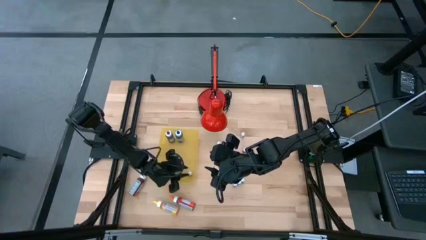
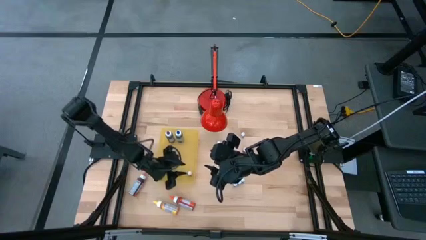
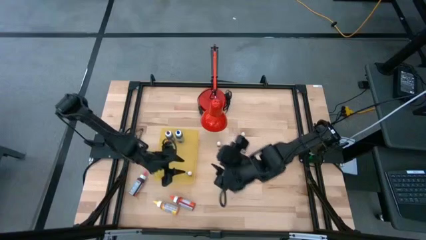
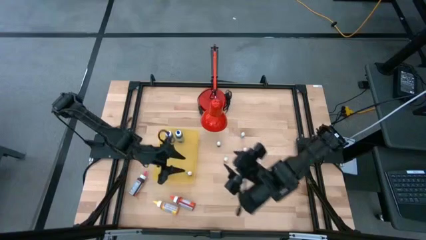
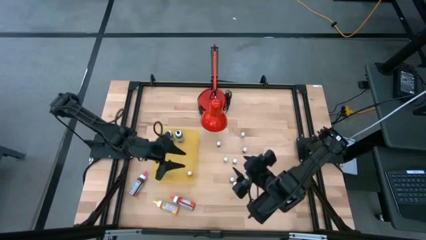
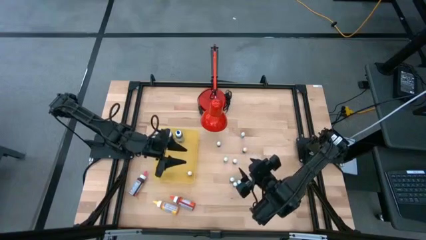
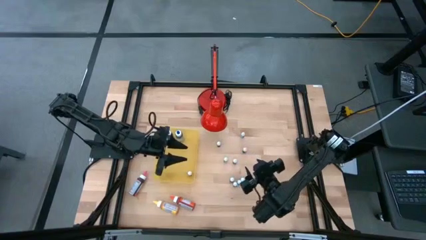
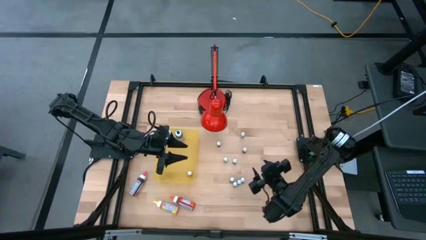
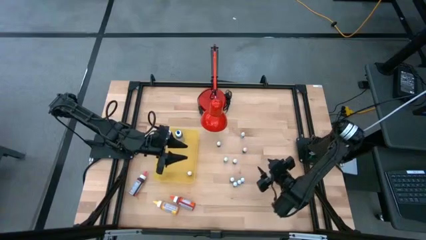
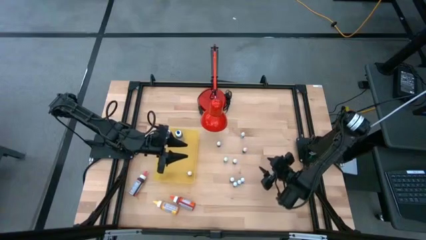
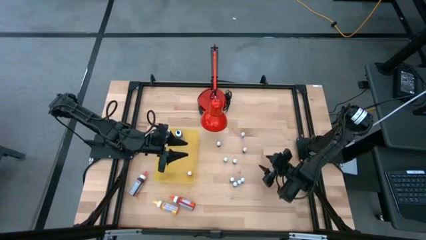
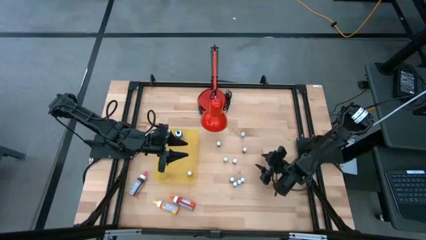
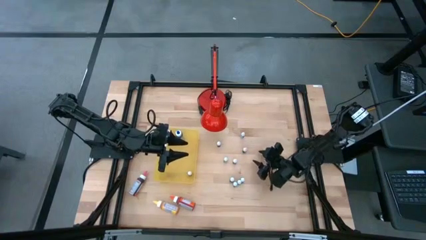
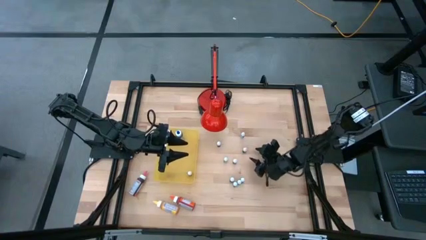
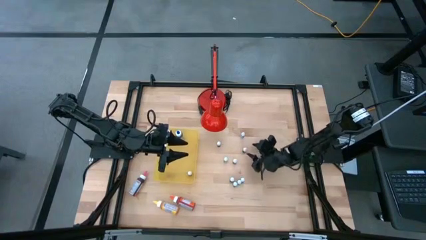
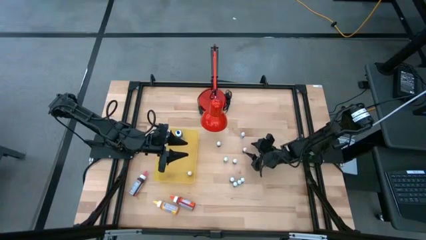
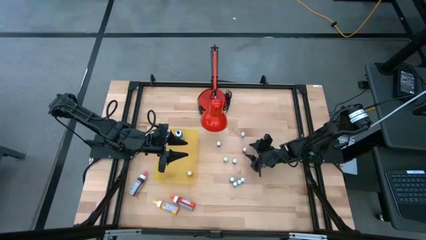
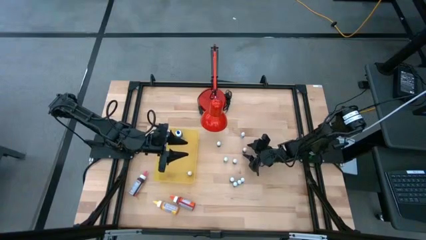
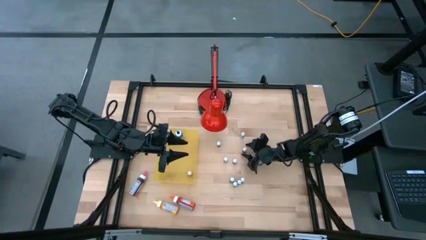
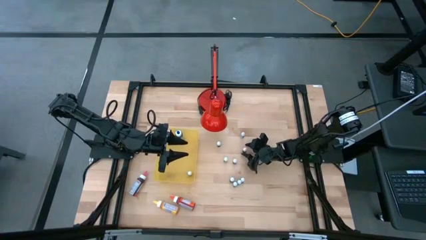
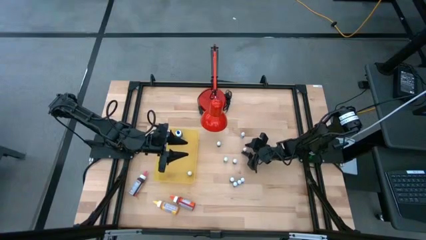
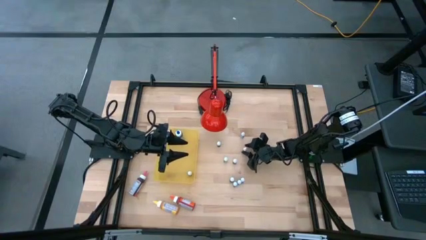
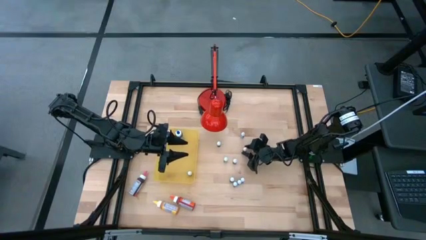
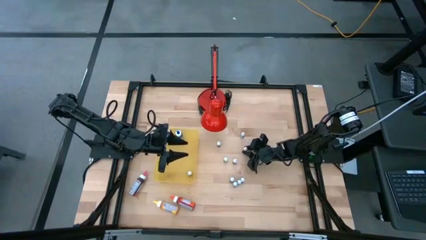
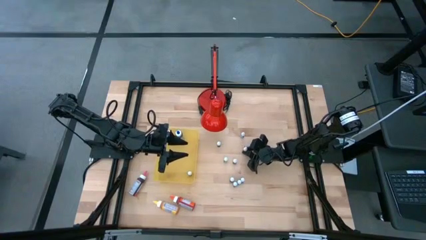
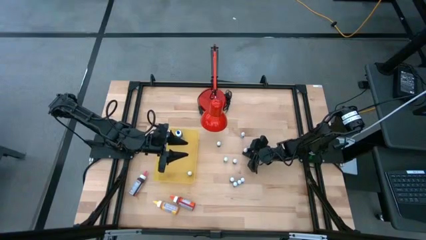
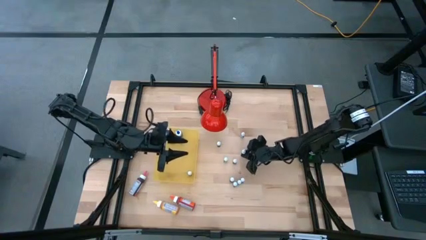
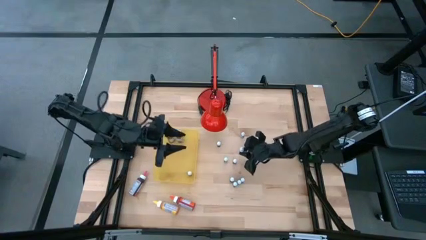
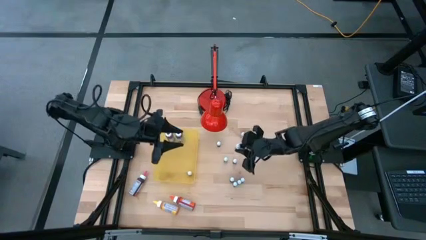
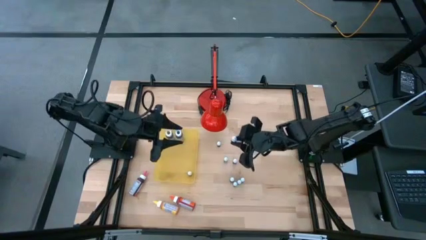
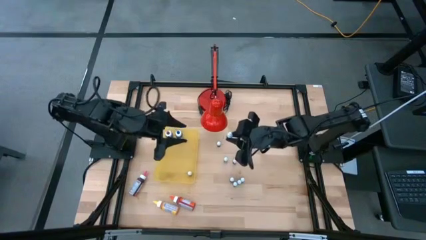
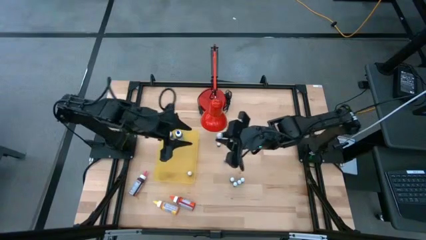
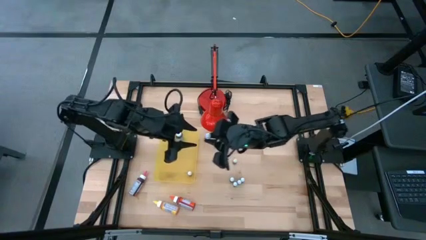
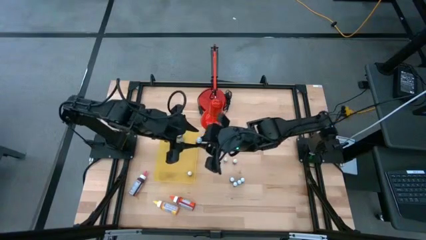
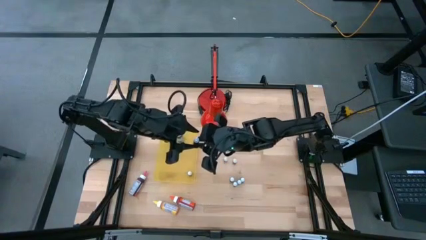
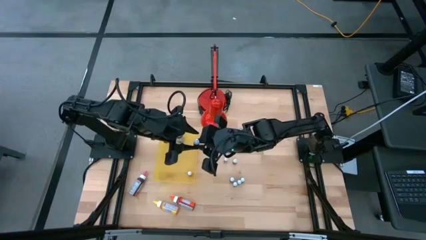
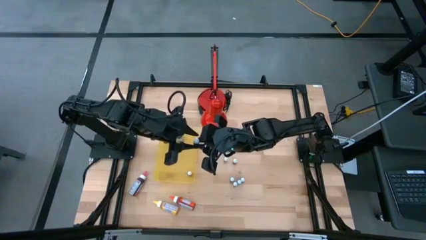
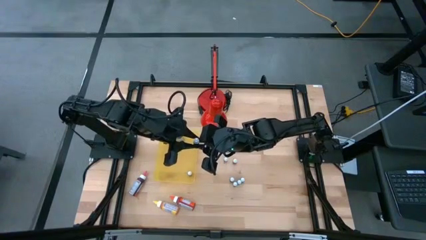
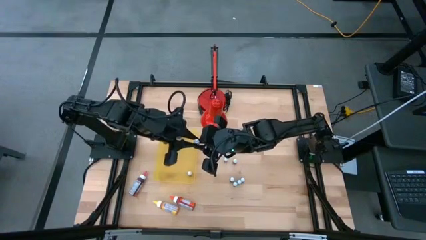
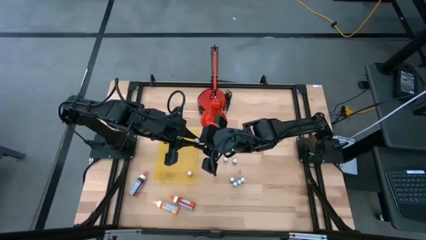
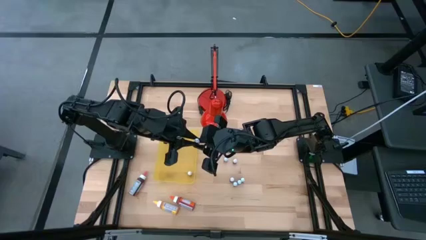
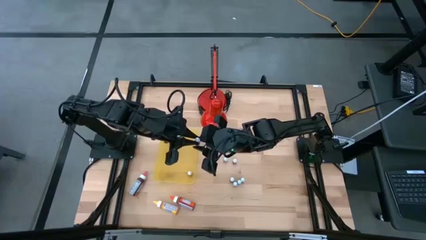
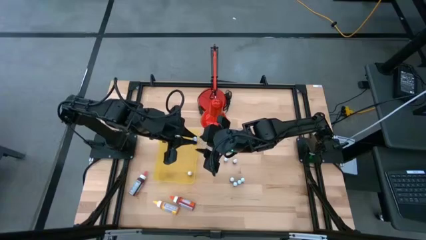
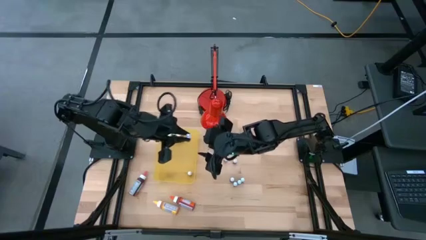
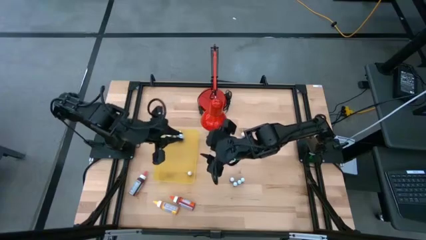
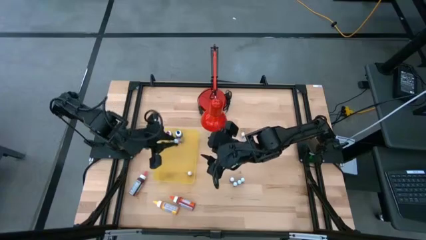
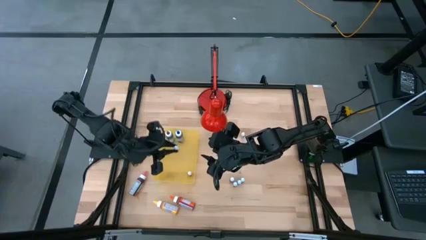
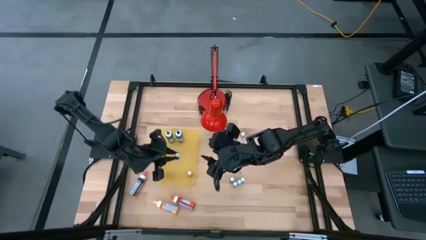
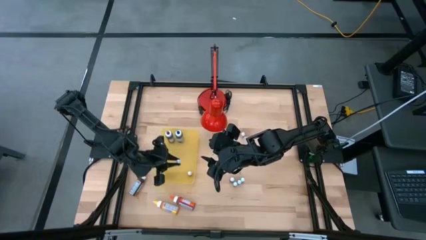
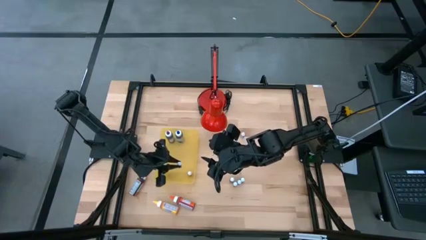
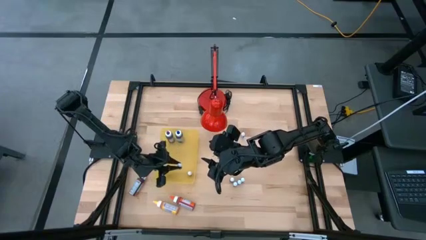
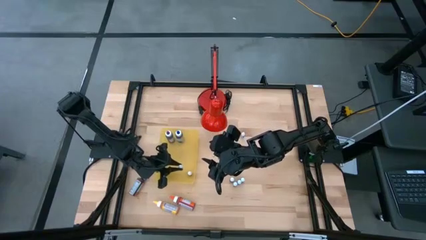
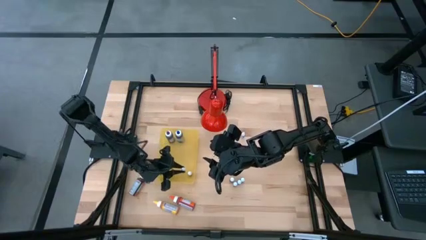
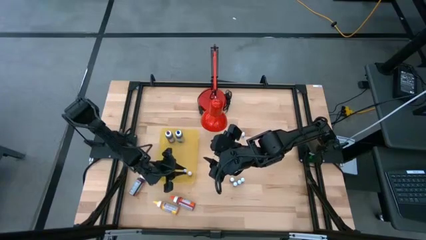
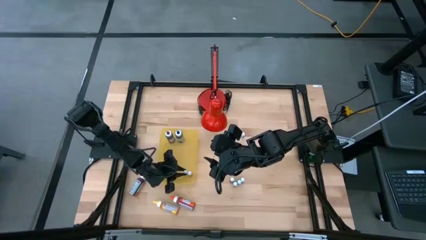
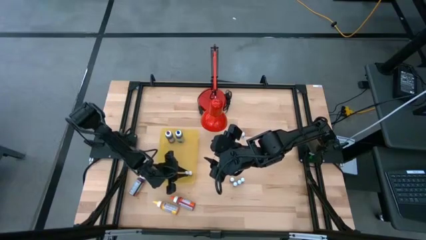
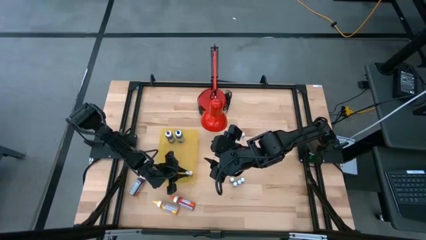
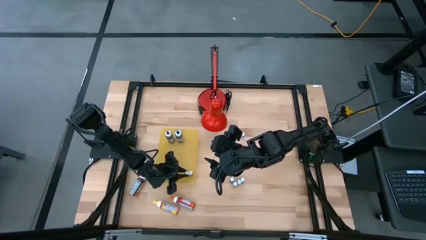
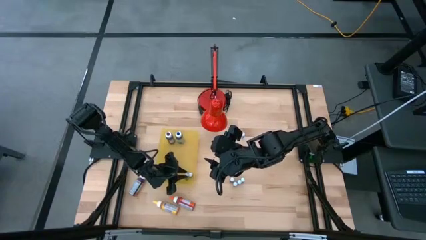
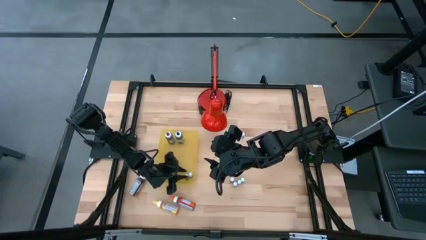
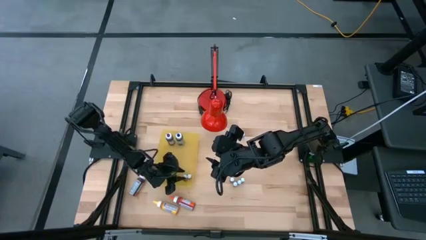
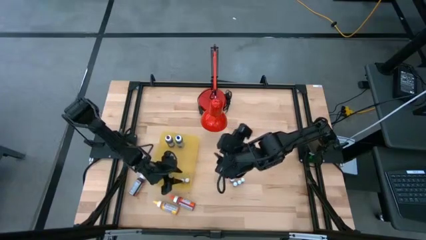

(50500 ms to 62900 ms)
Task: Pick & Place food coloring
Put the top small red food coloring bottle into the yellow bin
